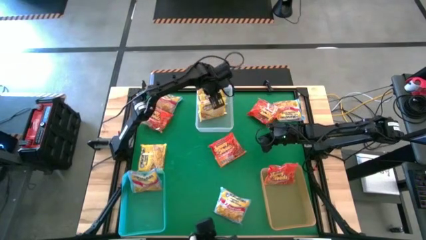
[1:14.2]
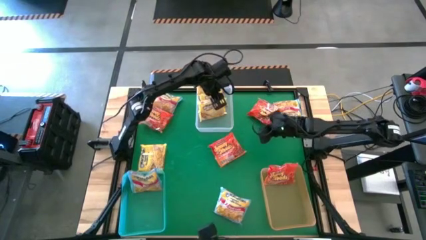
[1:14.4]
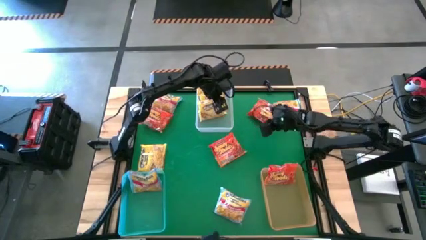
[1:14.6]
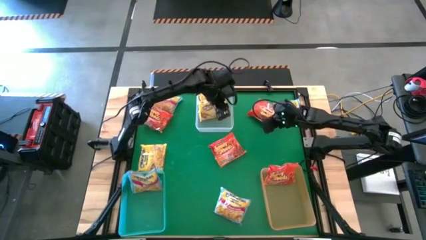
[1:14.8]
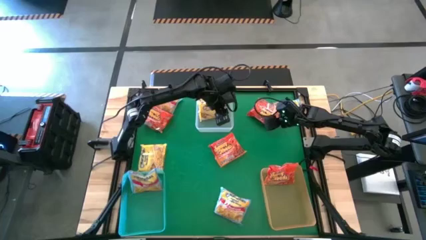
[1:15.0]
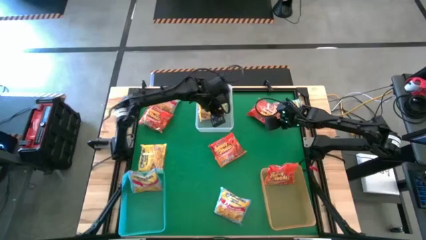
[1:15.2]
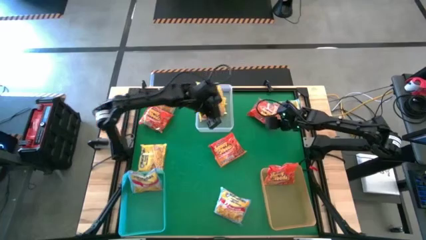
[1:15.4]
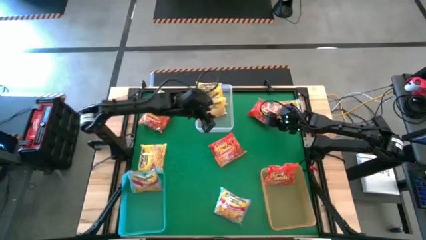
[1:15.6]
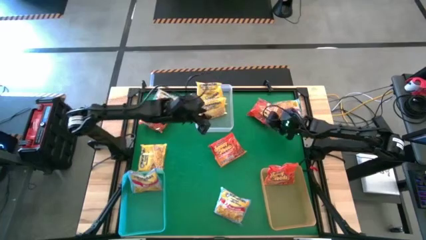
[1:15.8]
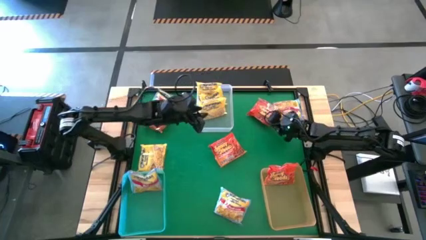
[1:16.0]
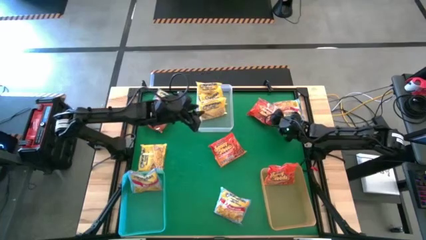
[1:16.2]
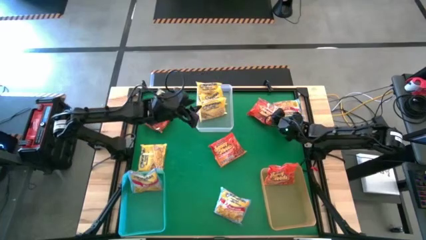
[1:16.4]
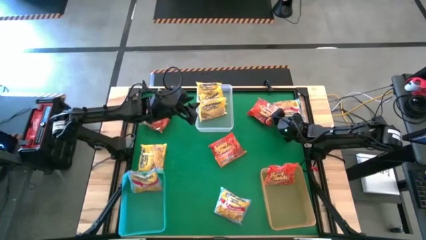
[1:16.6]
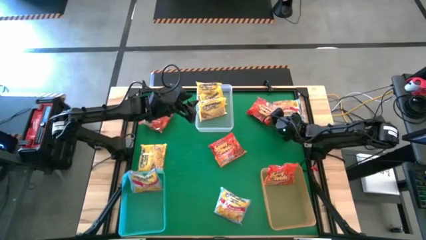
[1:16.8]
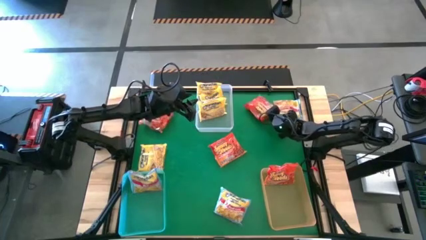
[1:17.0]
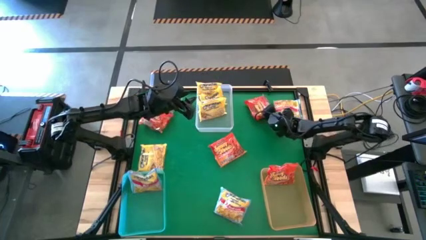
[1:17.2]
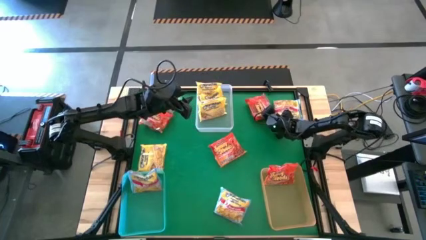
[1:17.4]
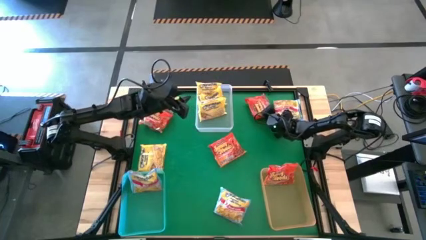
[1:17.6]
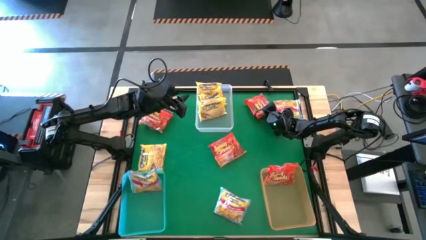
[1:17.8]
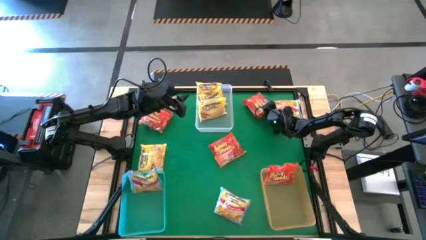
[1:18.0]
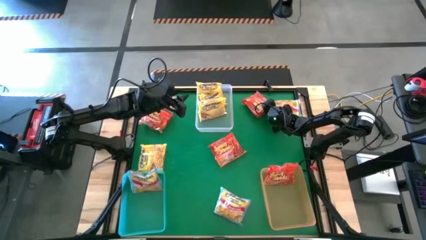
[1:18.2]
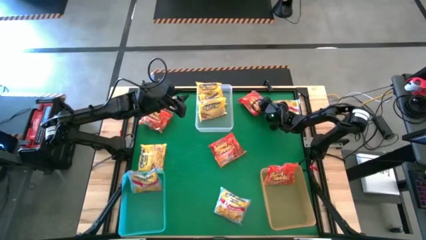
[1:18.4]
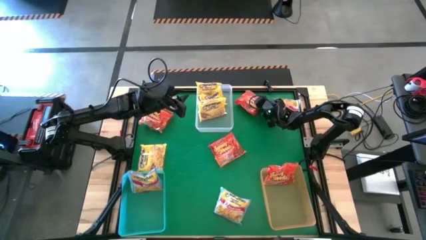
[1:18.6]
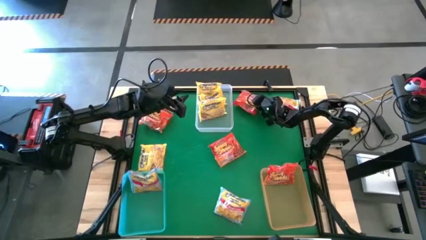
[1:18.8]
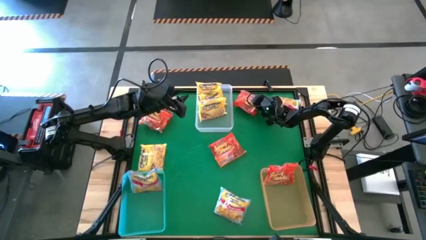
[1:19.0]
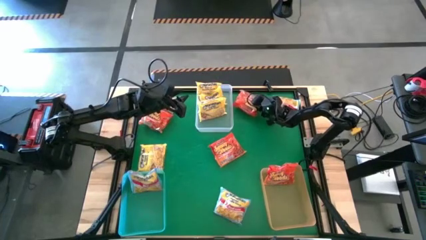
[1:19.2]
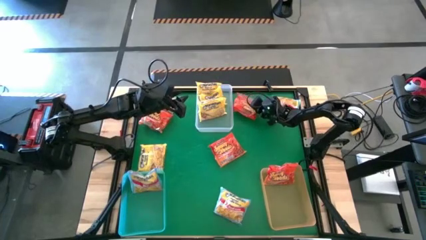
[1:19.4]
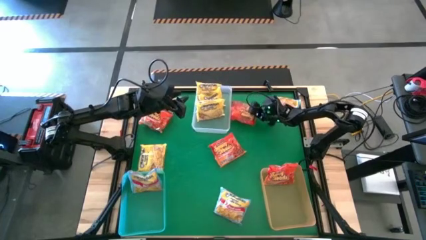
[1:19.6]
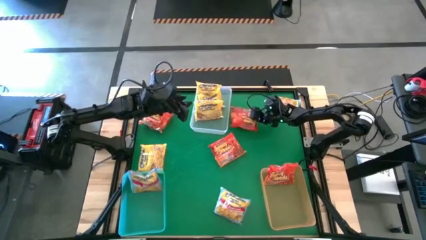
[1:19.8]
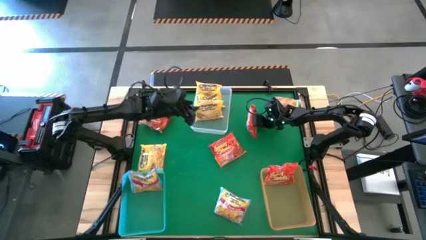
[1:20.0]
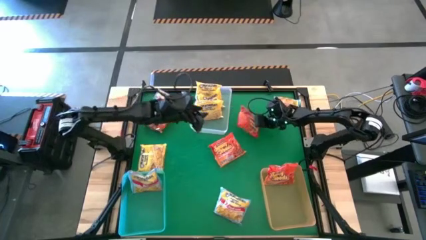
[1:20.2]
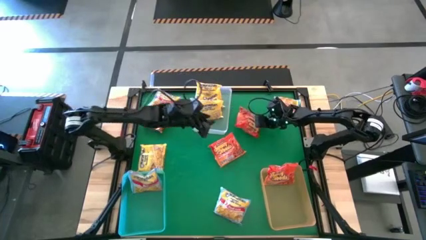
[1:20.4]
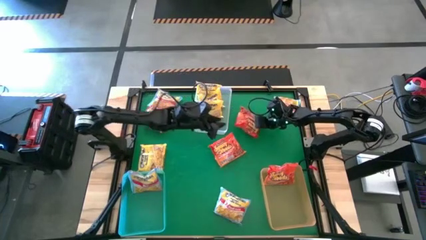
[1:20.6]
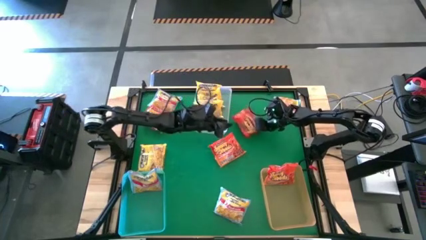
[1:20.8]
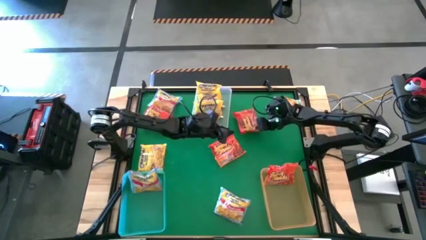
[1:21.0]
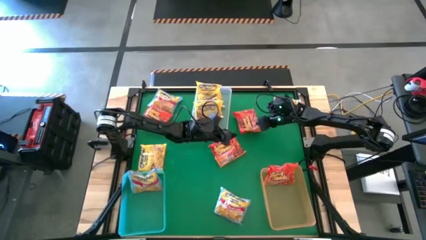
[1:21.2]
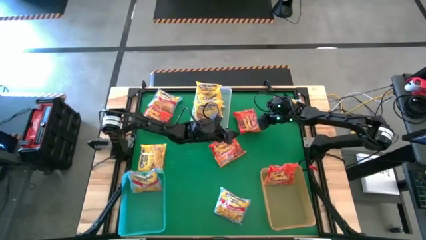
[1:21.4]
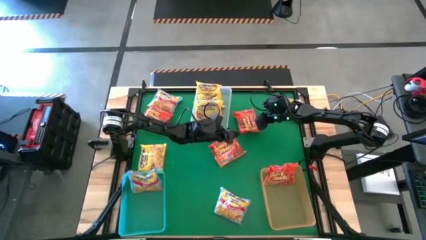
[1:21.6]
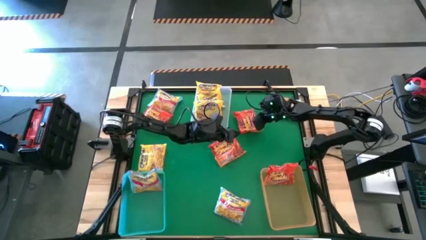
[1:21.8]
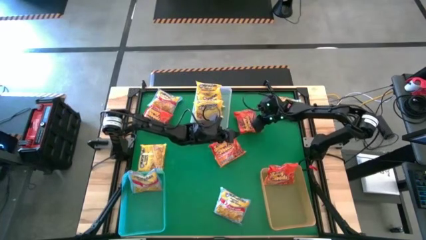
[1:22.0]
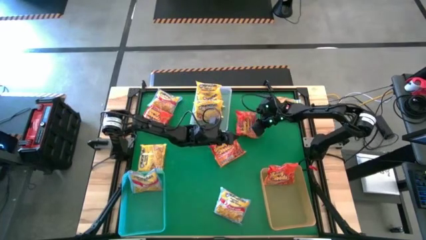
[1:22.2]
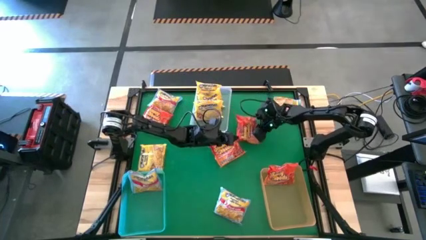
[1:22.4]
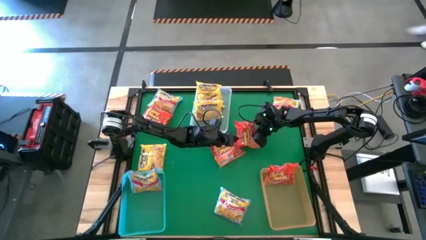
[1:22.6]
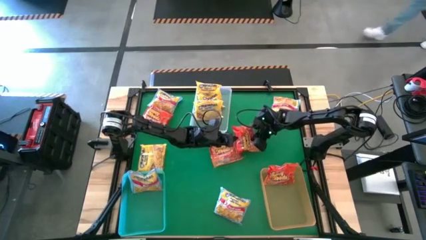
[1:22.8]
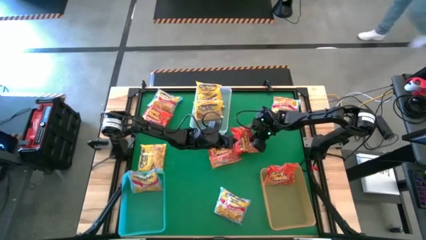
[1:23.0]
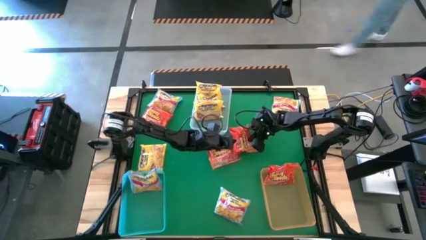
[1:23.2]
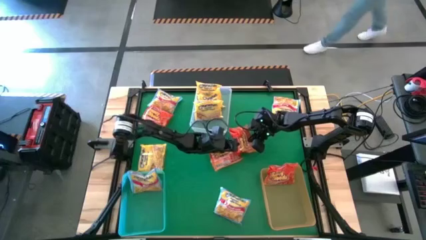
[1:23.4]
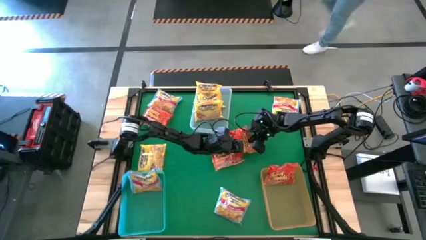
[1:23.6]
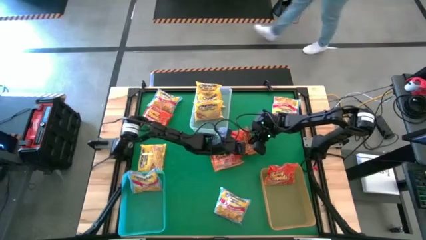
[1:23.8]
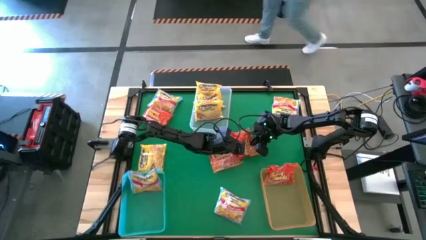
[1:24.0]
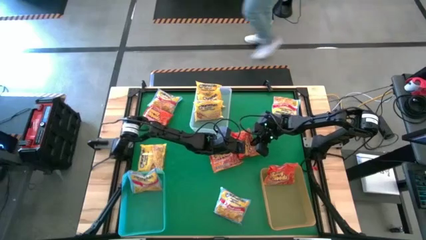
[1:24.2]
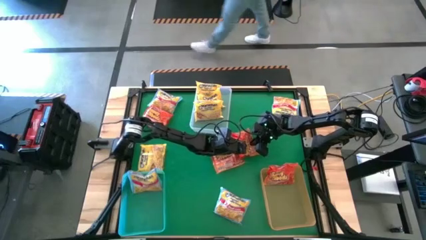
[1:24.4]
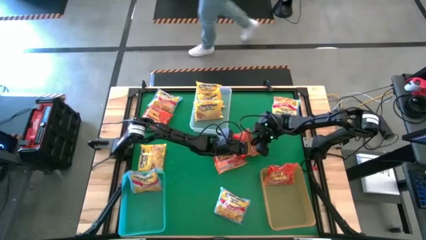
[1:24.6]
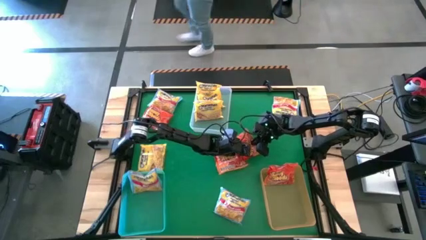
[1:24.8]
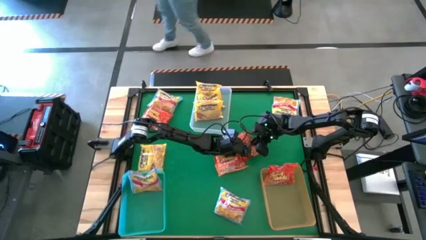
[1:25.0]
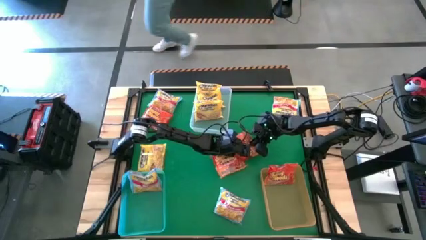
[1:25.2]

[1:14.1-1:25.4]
Task: Sort Maruchan noodles
Put the top right orange noodle pack into the orange bin

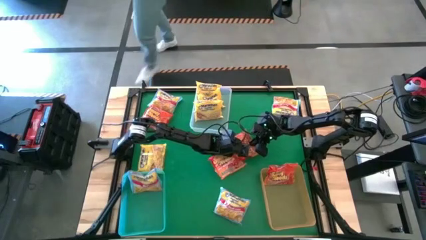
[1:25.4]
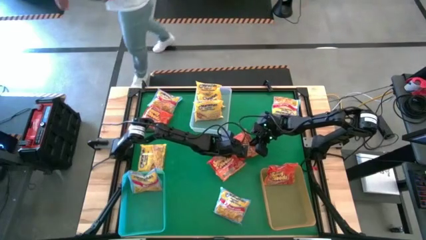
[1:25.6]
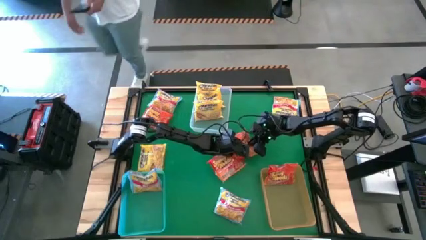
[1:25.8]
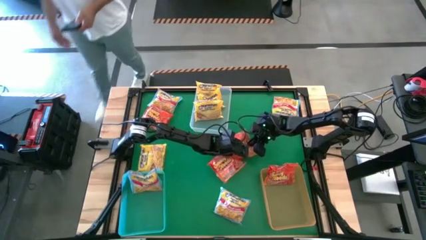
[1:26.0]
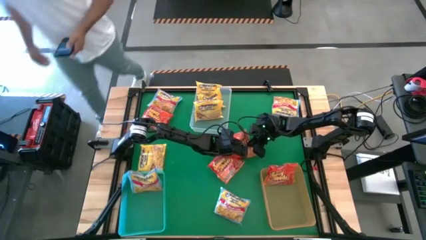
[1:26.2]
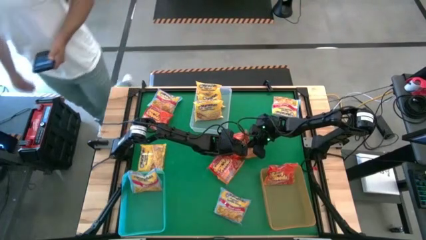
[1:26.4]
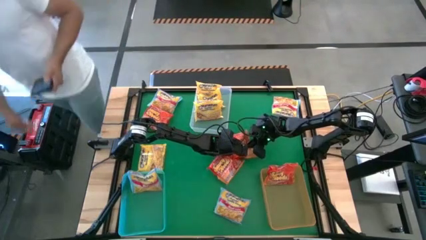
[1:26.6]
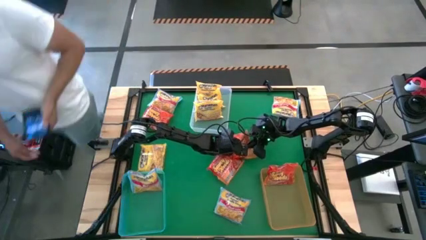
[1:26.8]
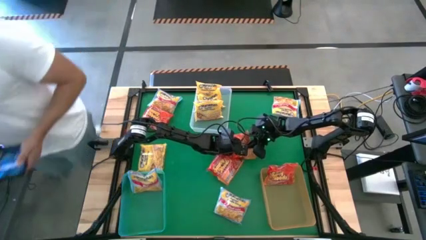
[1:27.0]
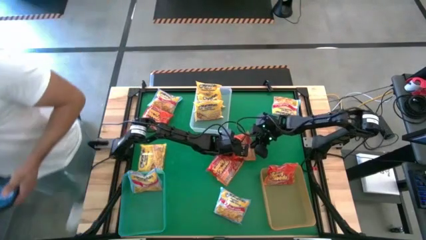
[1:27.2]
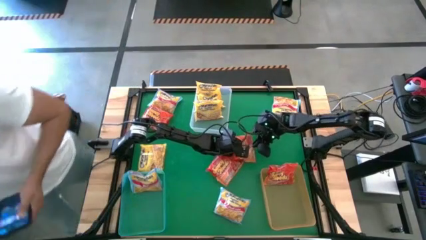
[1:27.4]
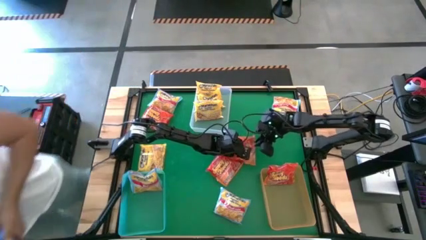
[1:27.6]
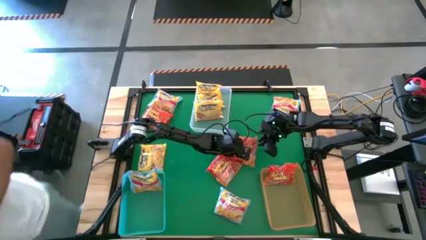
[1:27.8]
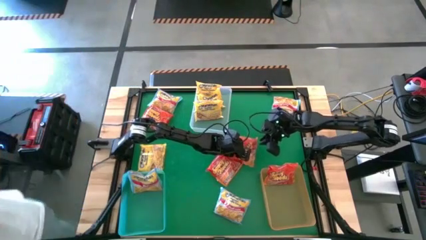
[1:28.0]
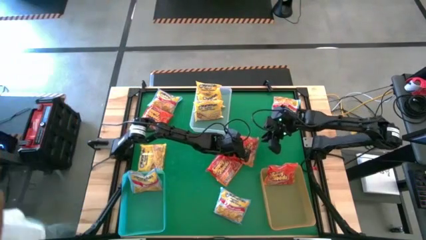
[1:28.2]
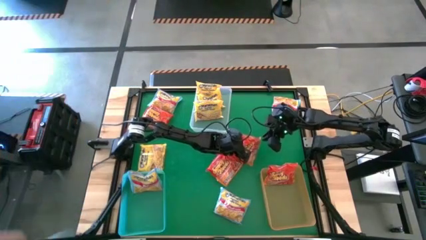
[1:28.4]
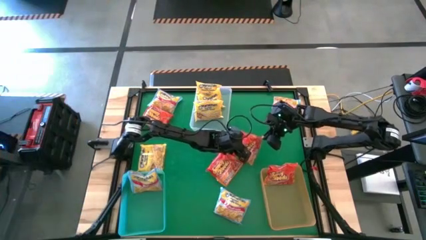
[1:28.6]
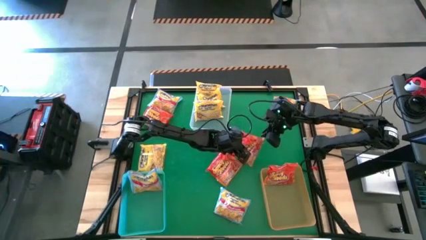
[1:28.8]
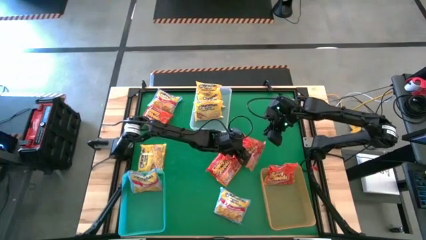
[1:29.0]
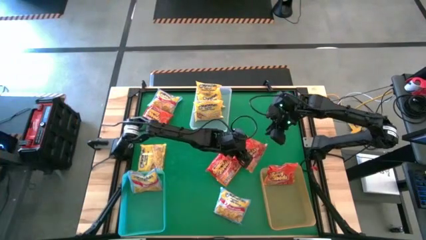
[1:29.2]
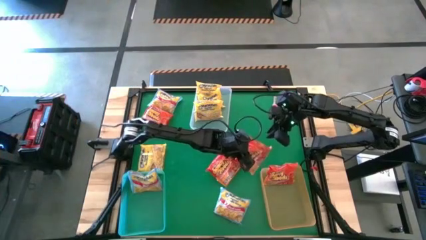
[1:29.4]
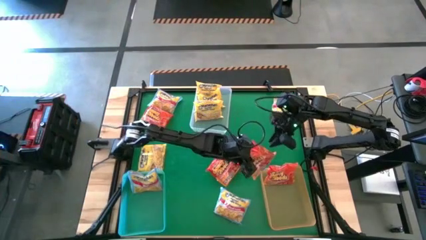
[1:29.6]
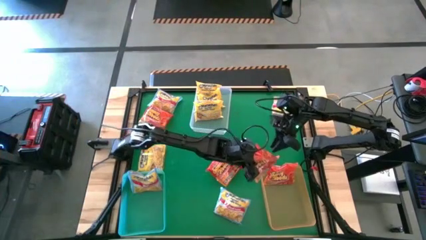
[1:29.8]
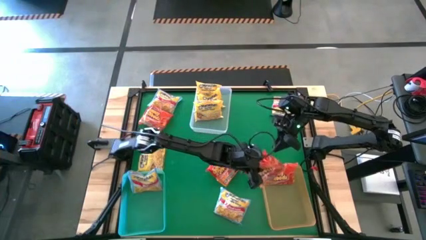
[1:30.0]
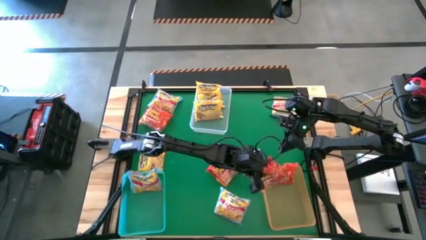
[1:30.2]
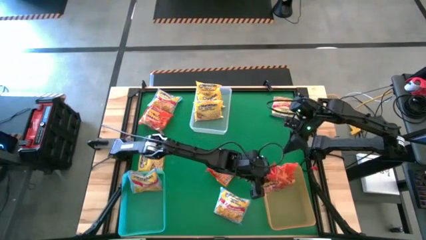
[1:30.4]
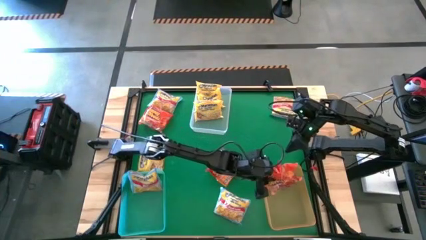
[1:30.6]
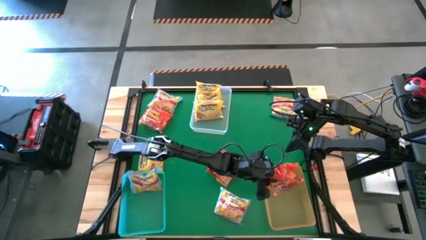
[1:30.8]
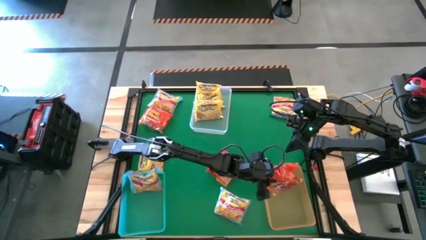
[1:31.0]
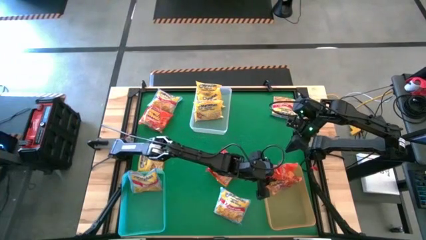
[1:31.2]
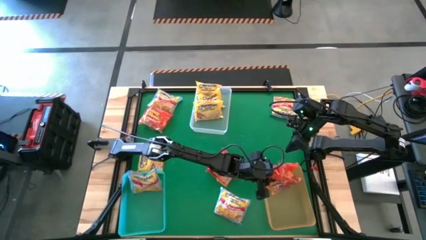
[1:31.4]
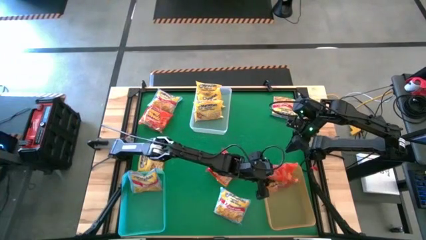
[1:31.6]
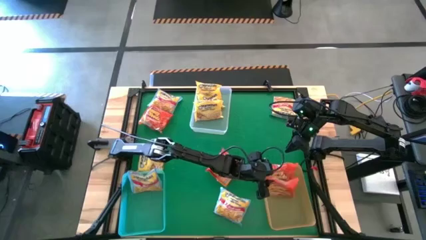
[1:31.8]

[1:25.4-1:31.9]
Put the top right orange noodle pack into the orange bin
